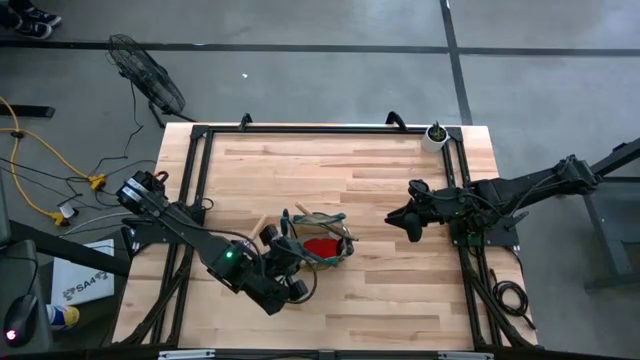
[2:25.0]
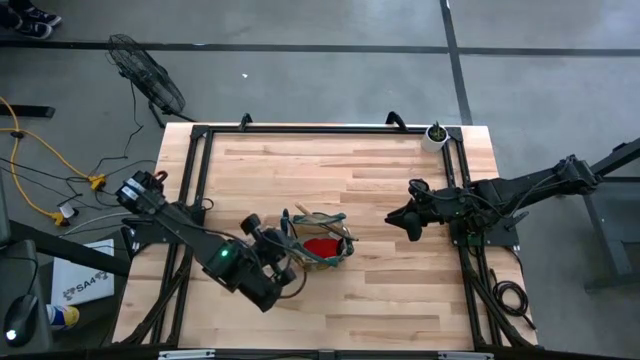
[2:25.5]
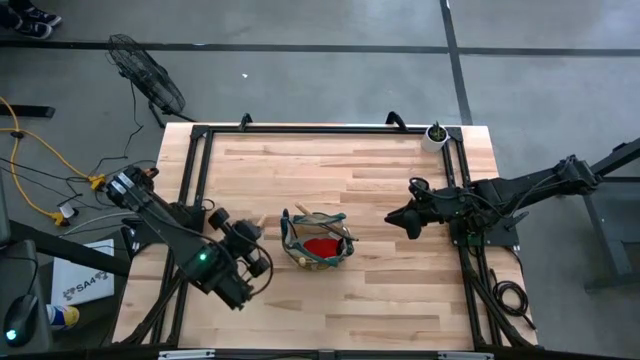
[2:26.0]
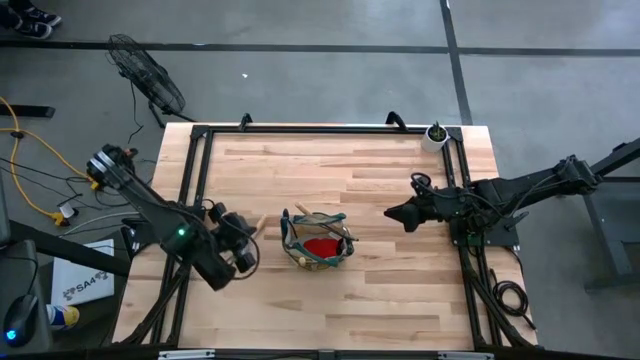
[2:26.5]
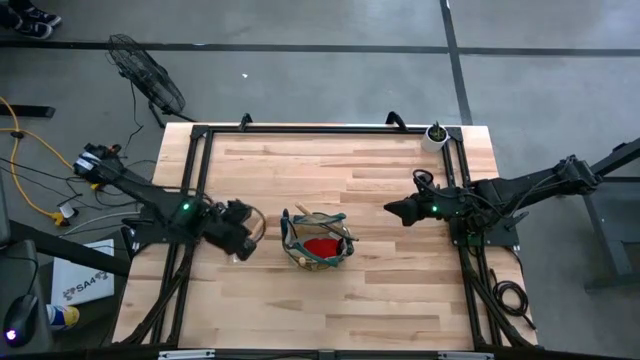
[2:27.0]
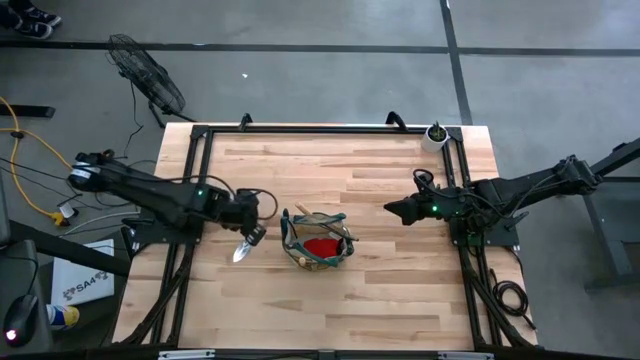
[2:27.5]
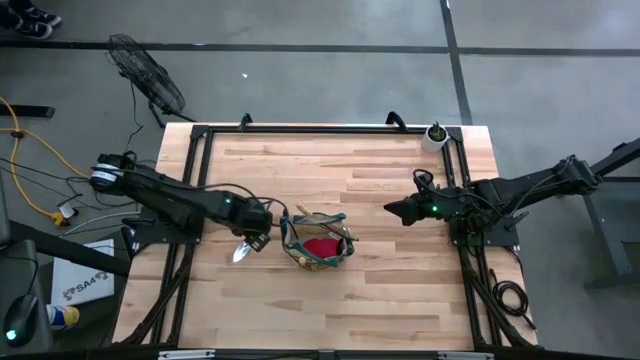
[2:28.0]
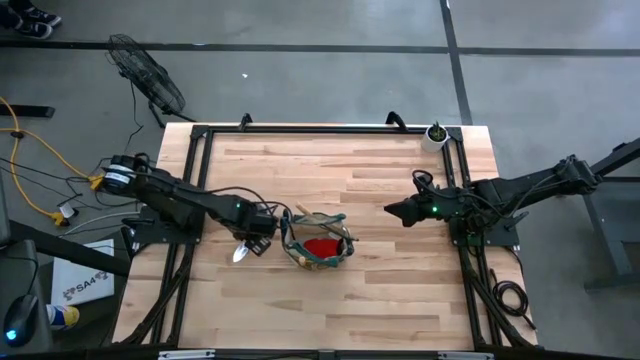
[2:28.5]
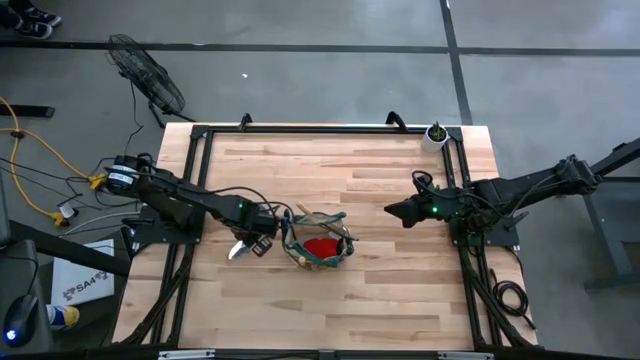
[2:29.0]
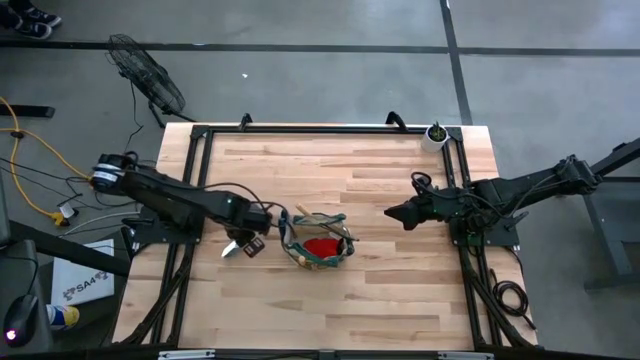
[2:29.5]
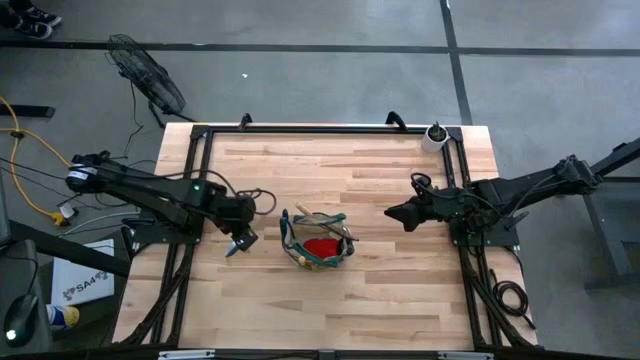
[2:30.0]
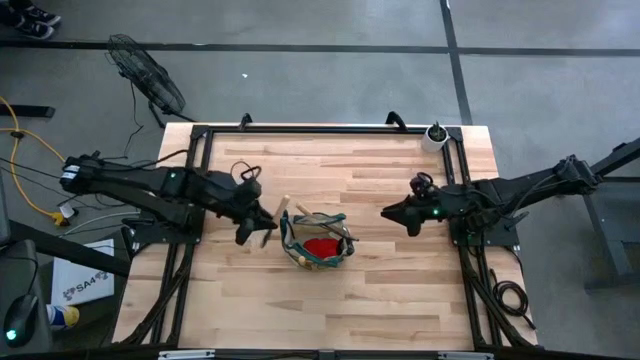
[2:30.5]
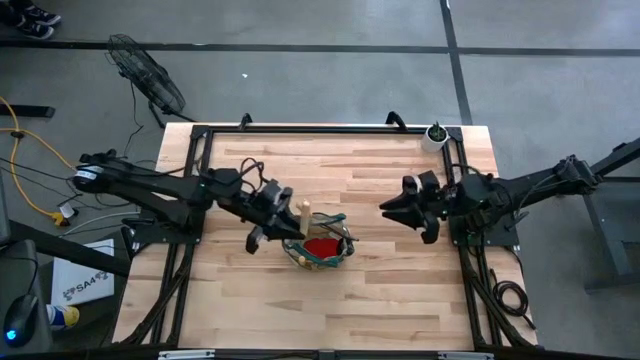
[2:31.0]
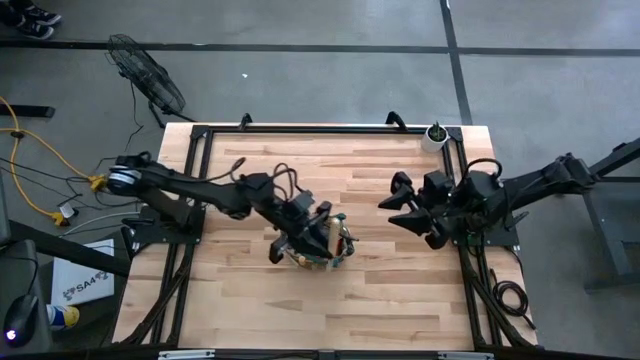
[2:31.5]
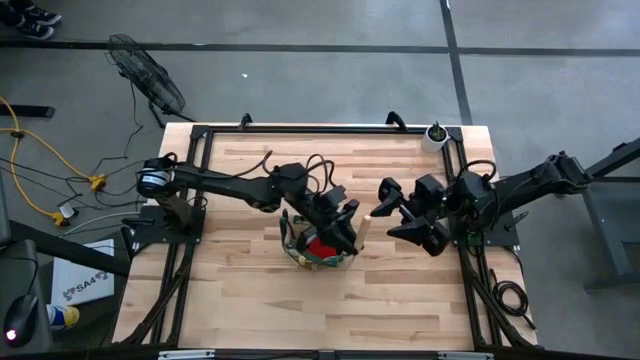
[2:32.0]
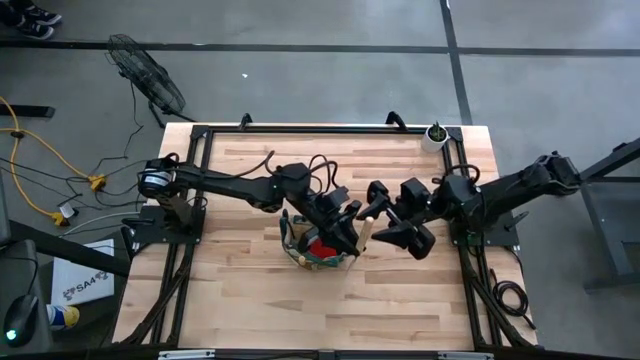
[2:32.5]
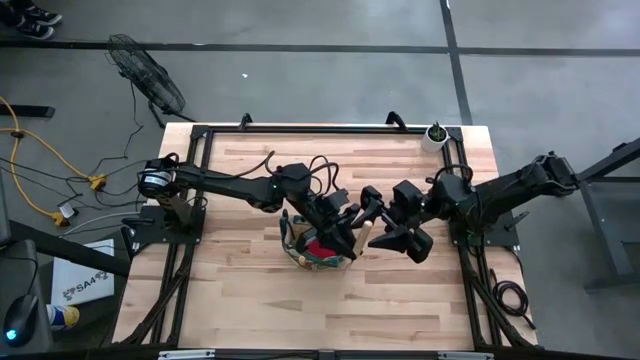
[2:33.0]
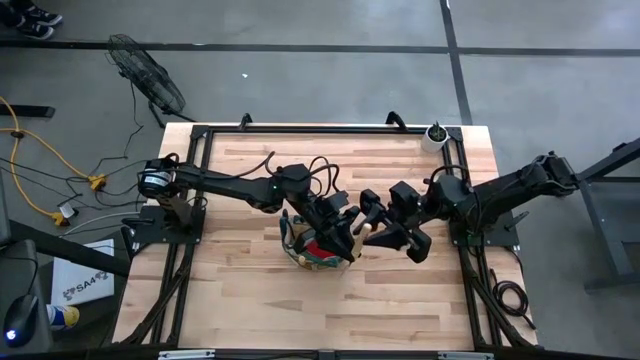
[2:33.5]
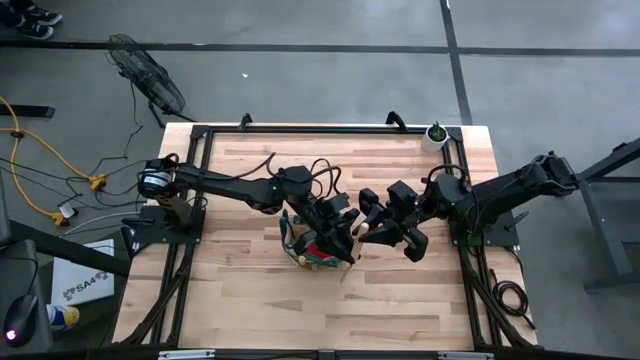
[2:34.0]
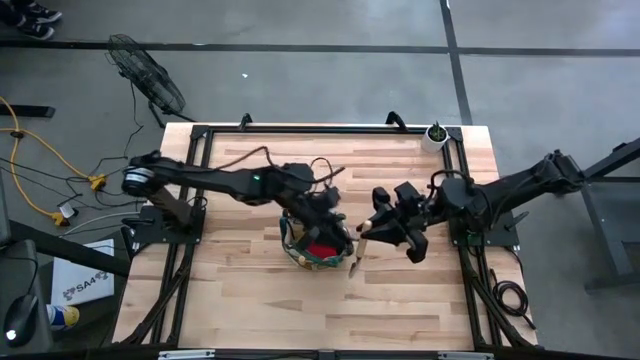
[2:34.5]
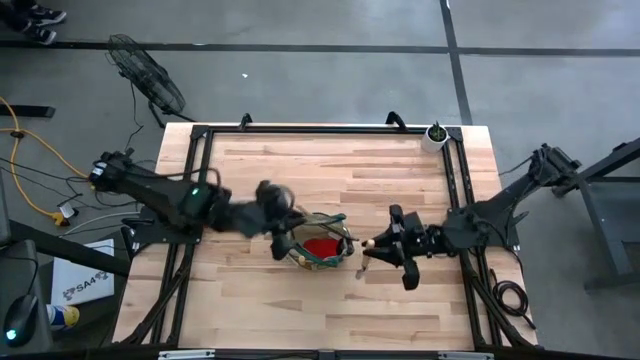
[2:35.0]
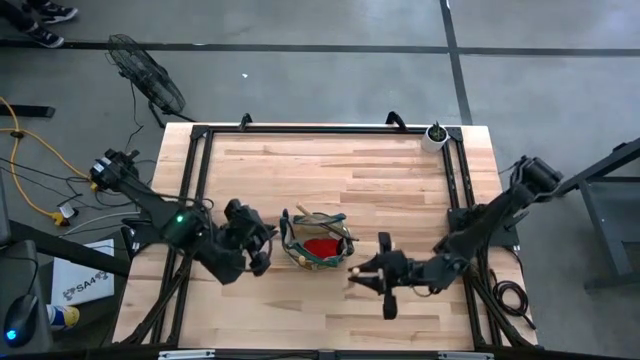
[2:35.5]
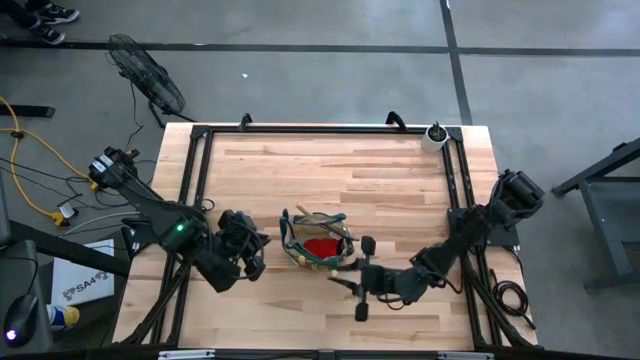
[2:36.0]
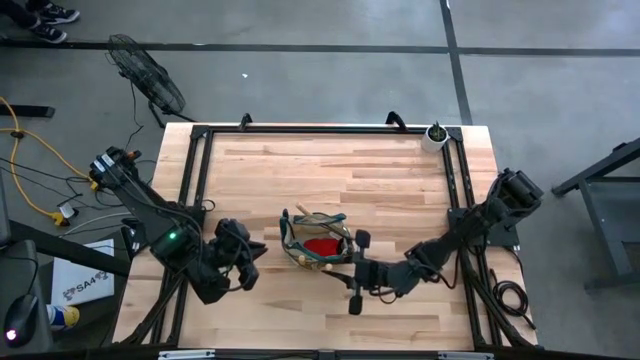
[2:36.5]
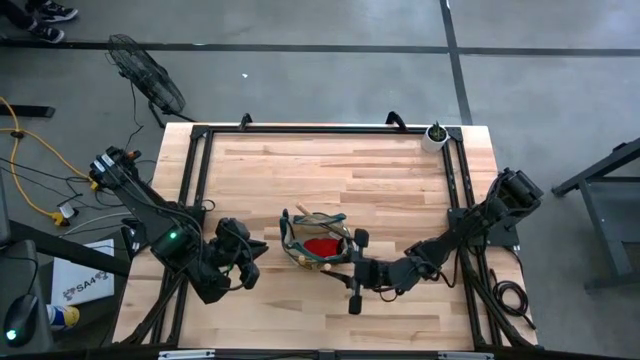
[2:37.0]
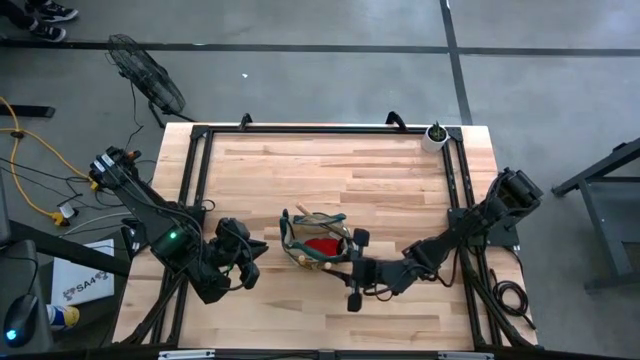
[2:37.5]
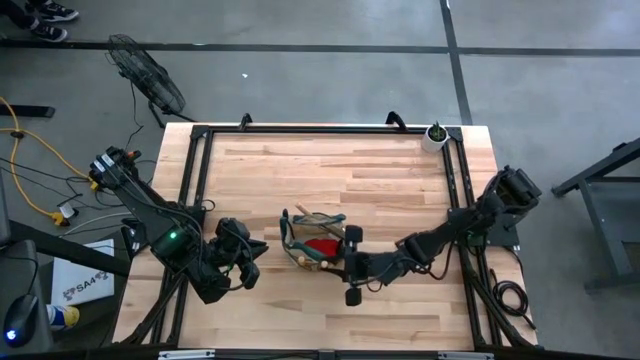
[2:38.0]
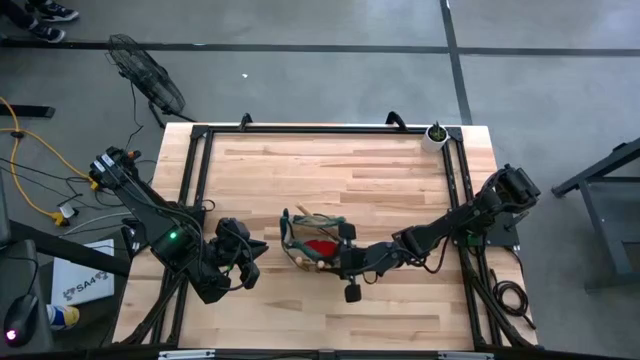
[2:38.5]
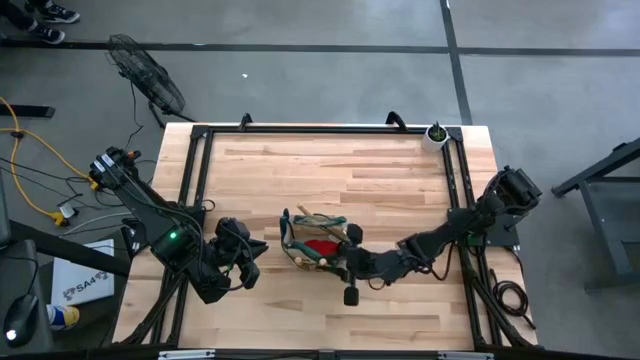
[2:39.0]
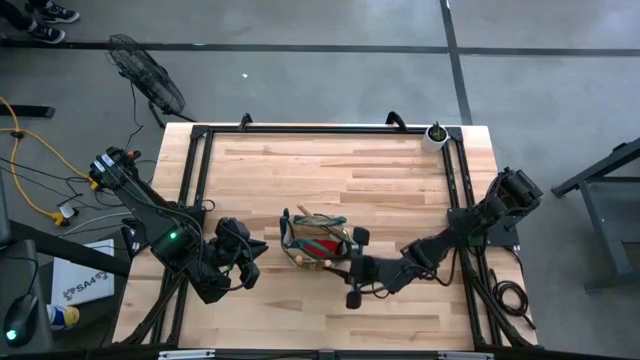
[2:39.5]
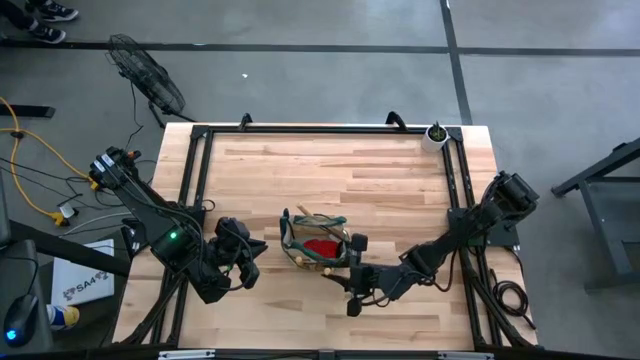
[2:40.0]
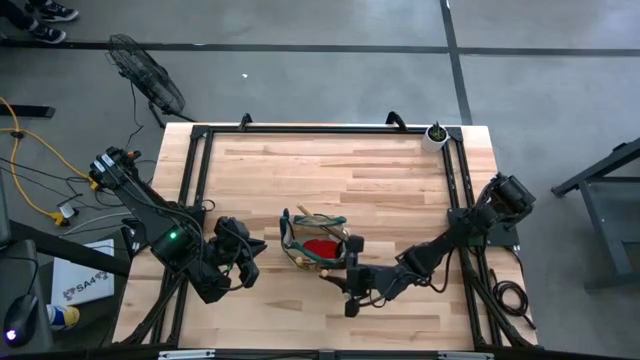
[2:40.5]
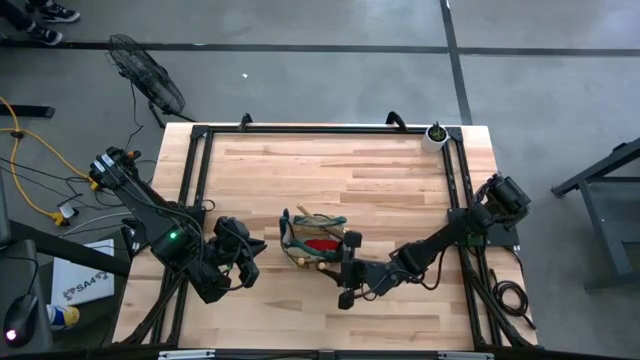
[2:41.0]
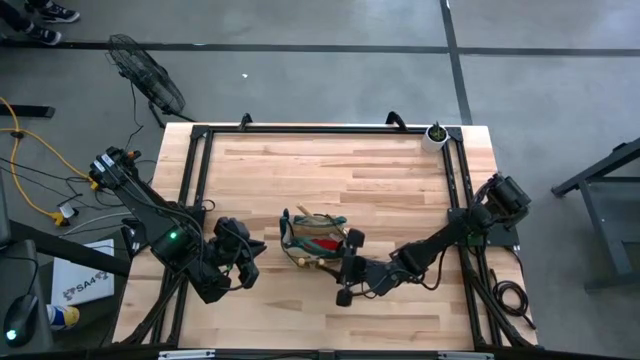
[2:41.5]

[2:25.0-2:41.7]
Task: Pick & Place Garden tools in Gardening bag
Put the light brown trowel into the light brown gardening bag

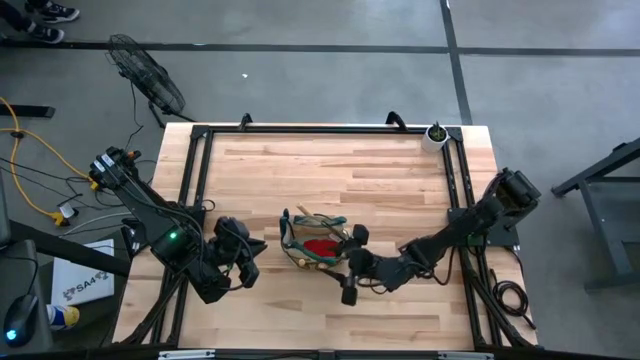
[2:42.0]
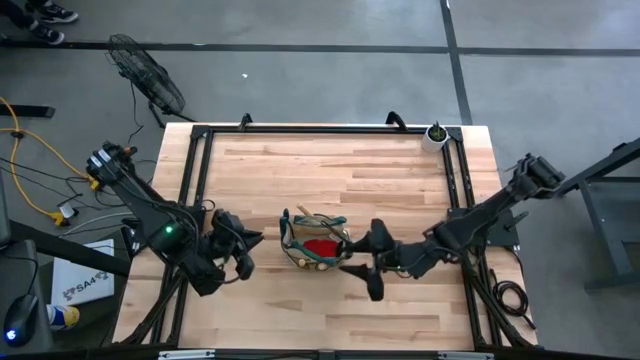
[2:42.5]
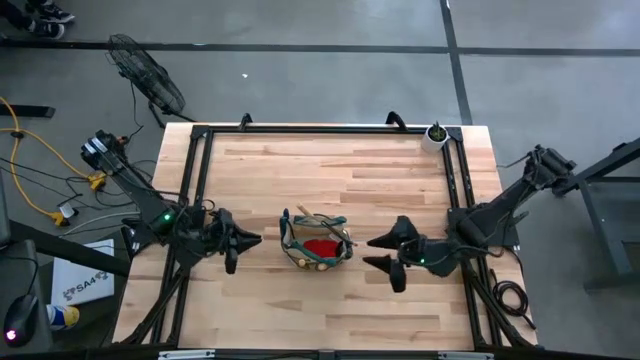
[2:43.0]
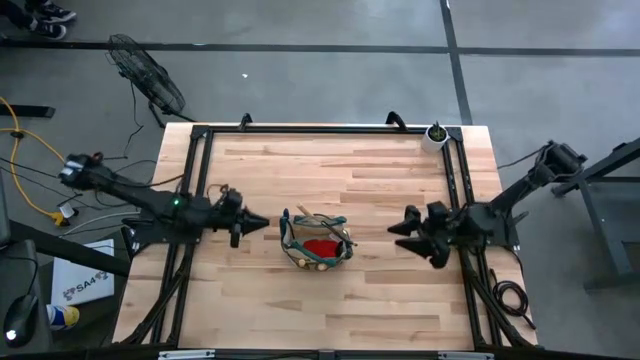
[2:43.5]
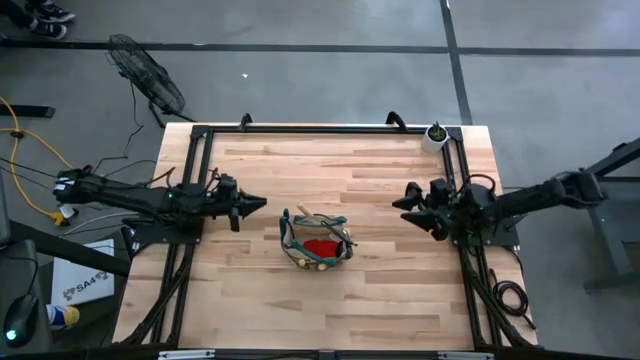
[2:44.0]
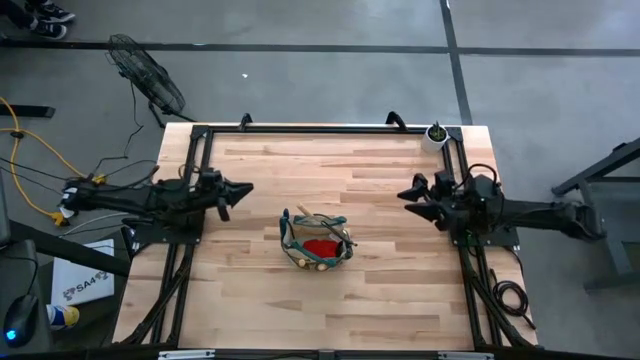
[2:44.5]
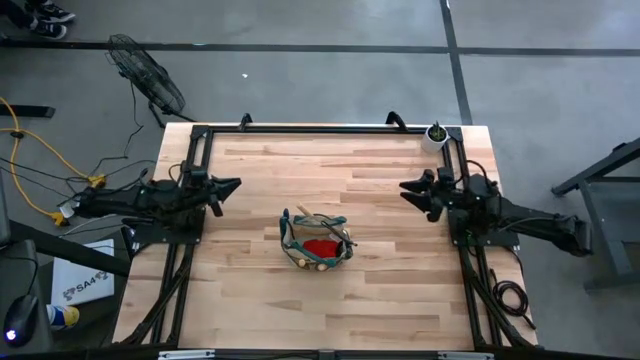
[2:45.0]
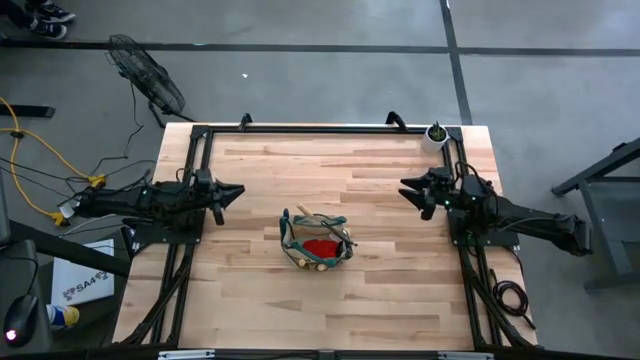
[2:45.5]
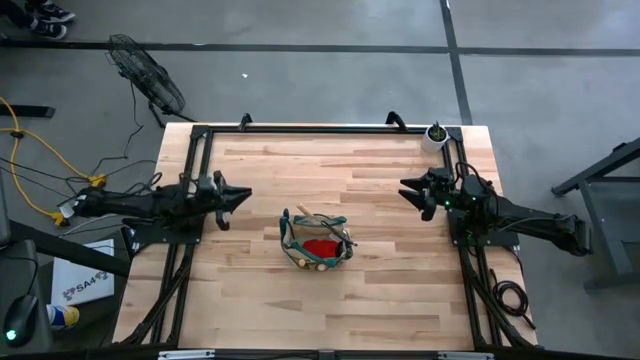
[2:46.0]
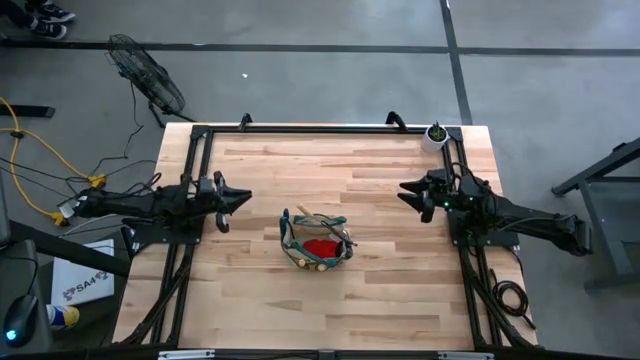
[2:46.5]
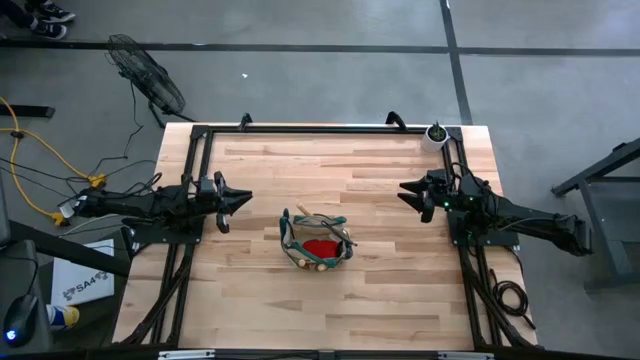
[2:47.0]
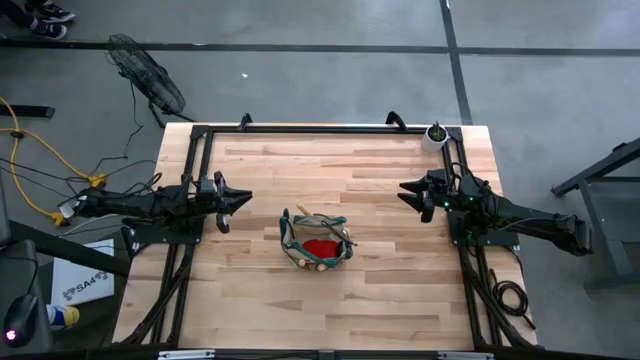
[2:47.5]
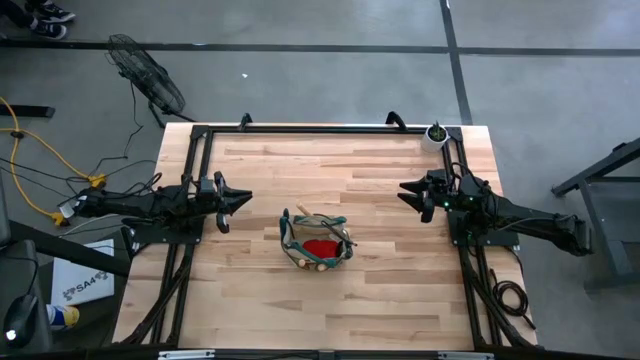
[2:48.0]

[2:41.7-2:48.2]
Return to Home Position
